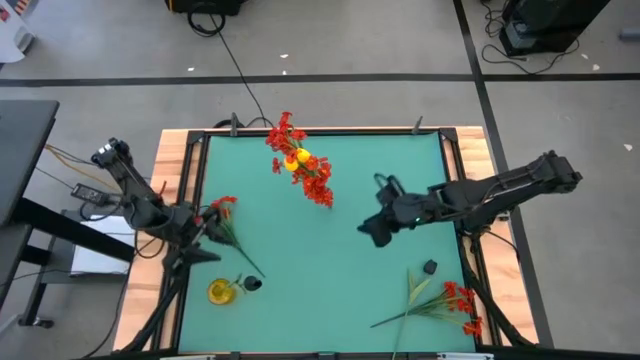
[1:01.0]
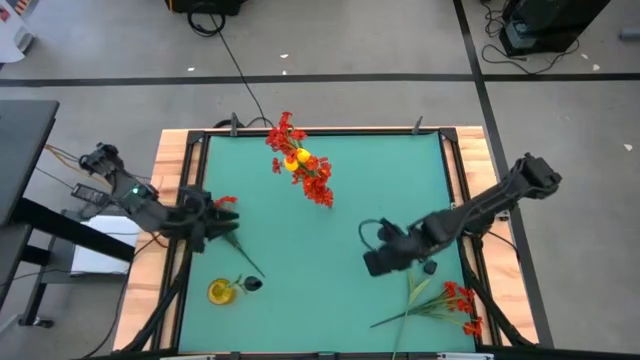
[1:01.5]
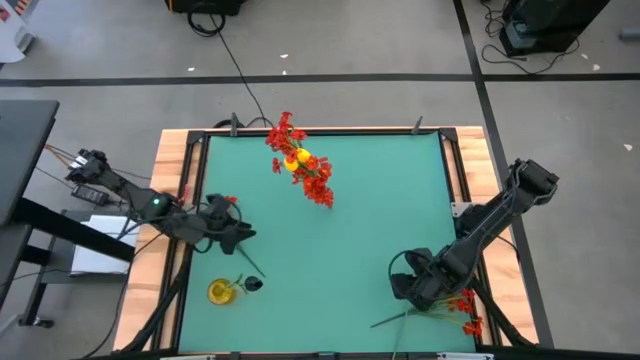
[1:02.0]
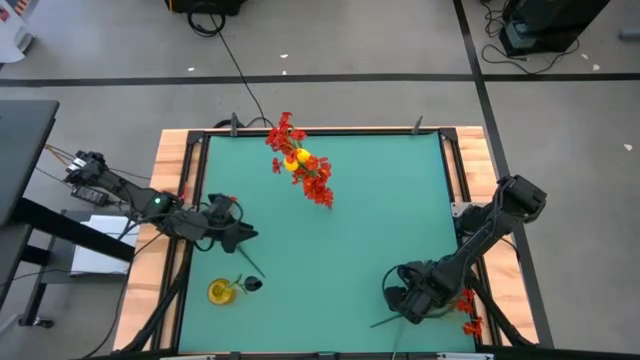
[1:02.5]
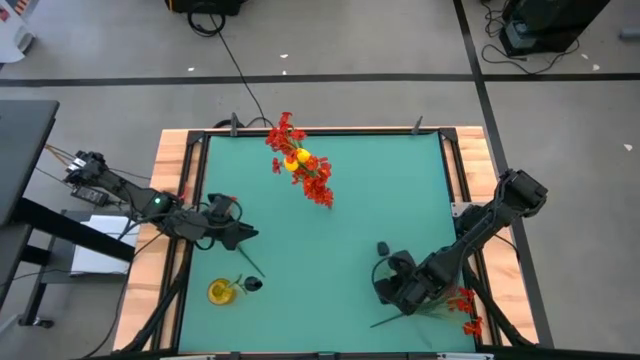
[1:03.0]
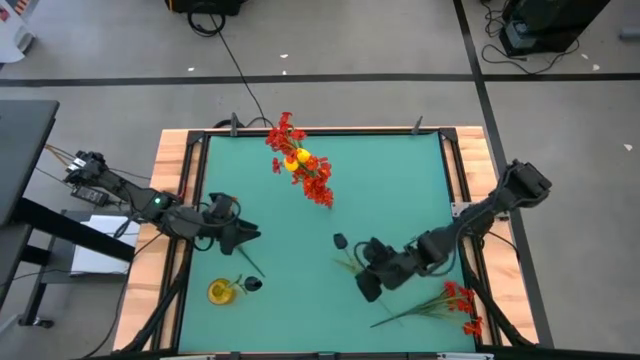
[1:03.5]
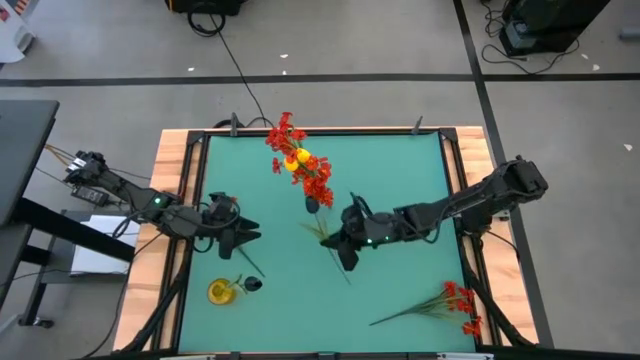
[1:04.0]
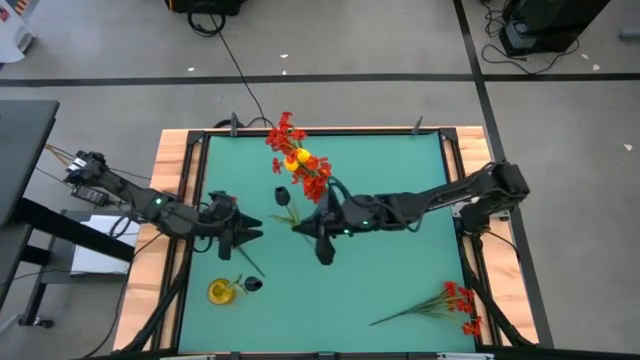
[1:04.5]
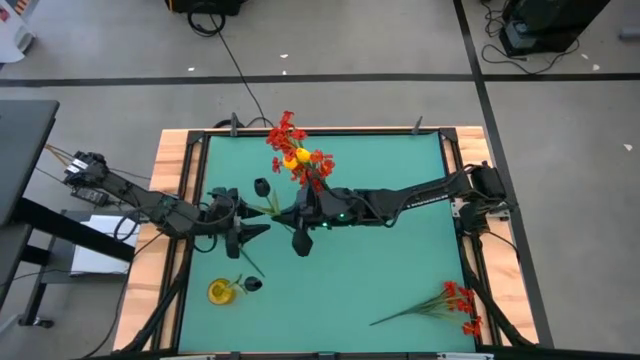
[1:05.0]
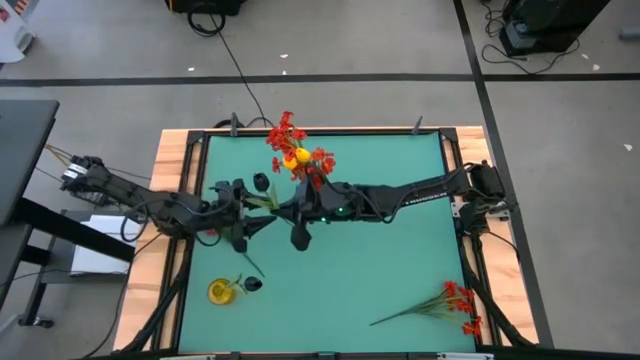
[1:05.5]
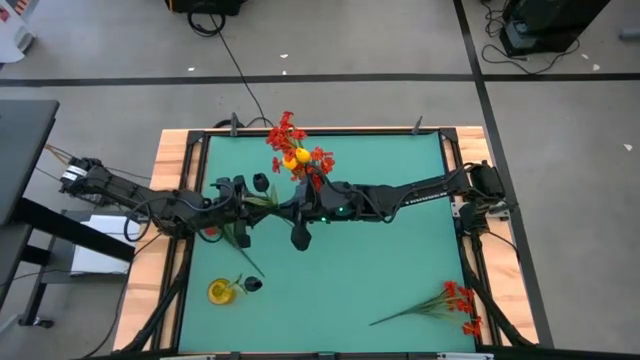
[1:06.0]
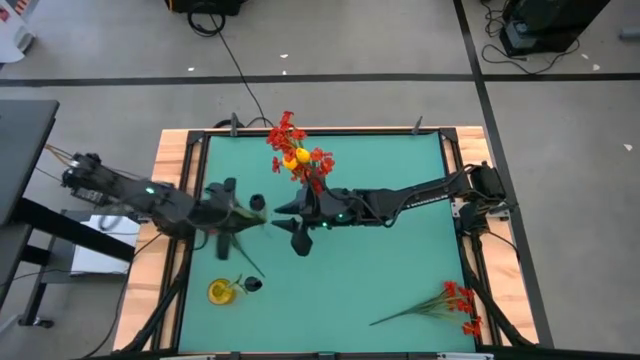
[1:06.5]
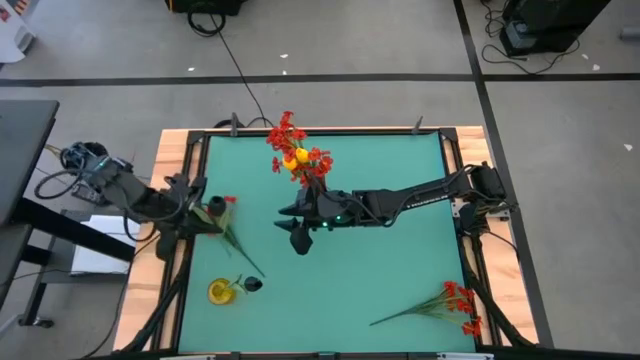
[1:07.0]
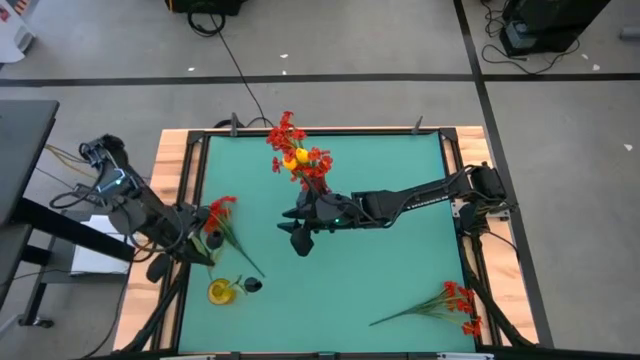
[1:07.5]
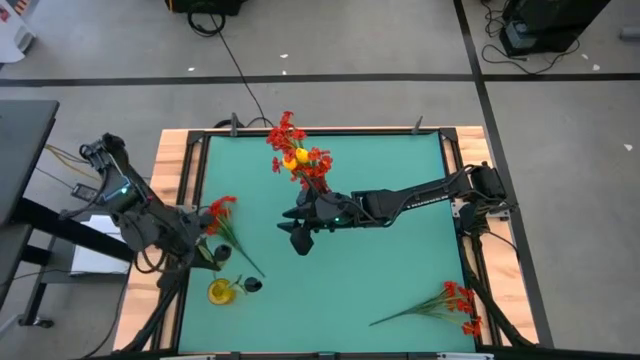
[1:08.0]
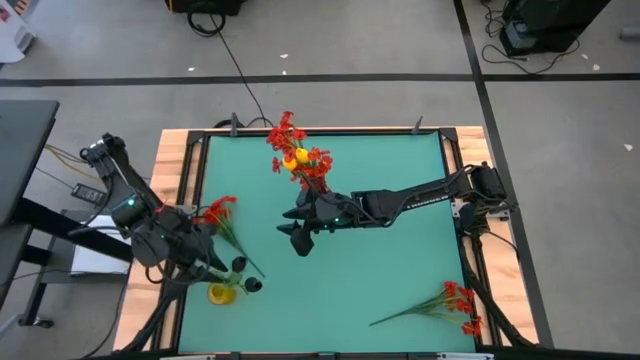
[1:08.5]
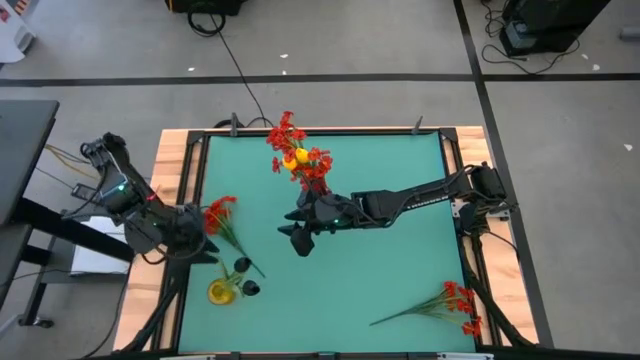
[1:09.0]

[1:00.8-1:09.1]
Task: Sort flowers into vase by color
Put the black tulip into the yellow vase

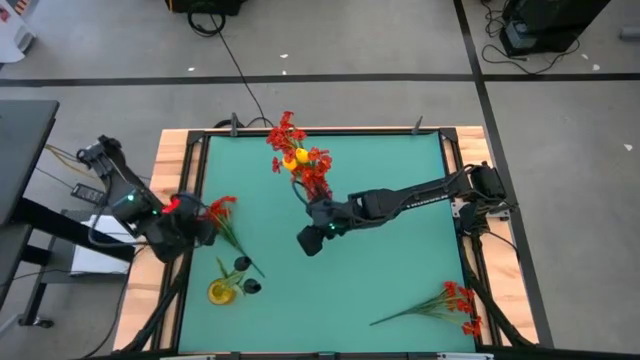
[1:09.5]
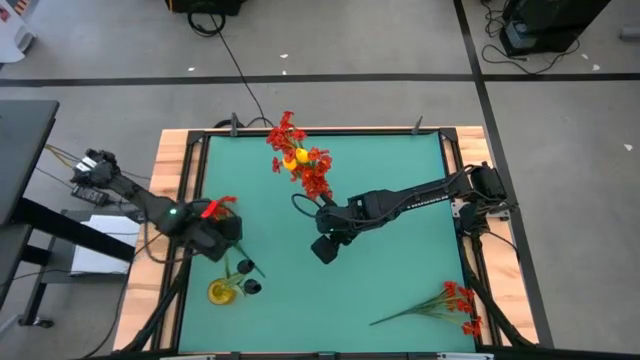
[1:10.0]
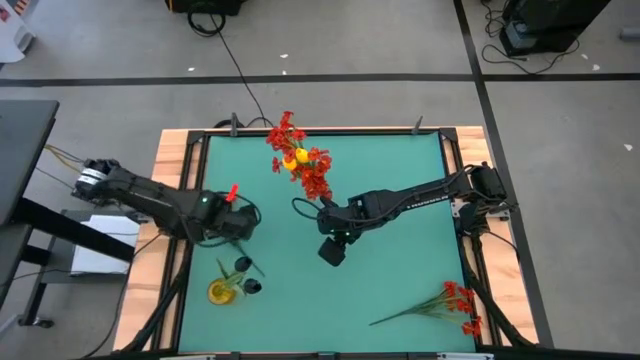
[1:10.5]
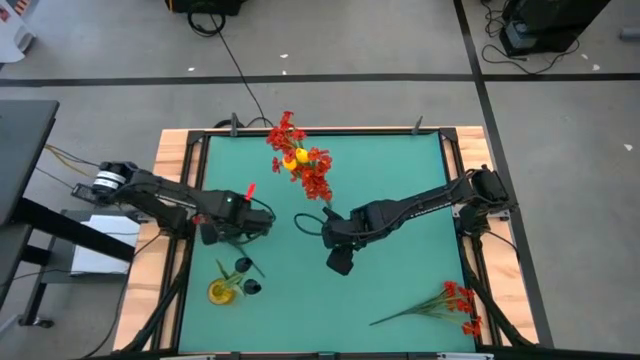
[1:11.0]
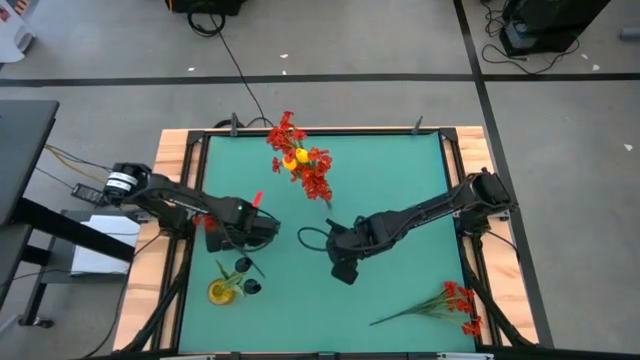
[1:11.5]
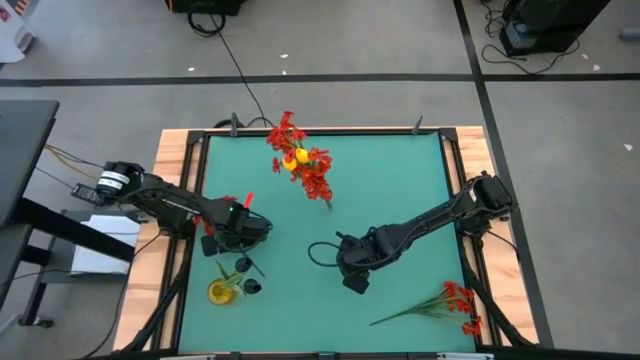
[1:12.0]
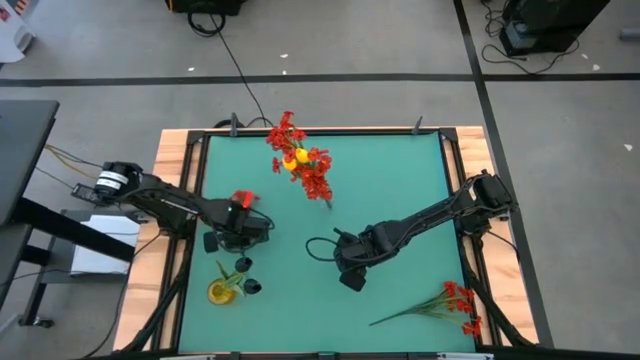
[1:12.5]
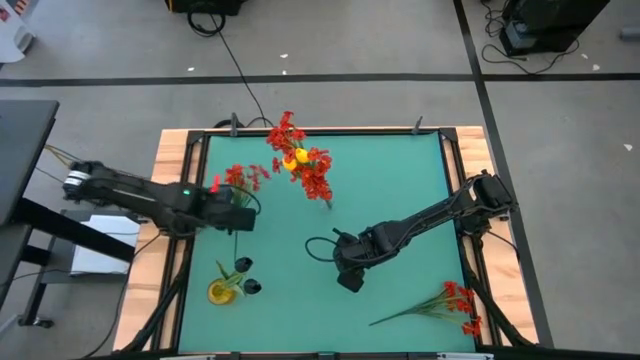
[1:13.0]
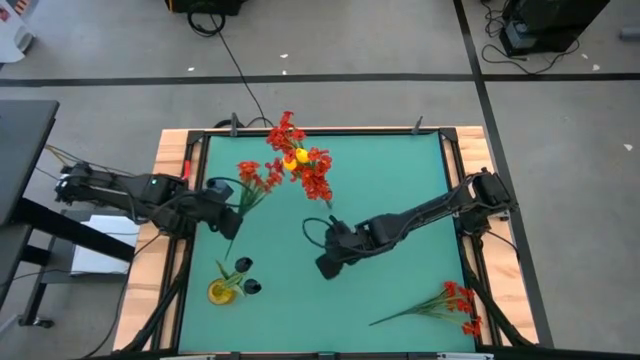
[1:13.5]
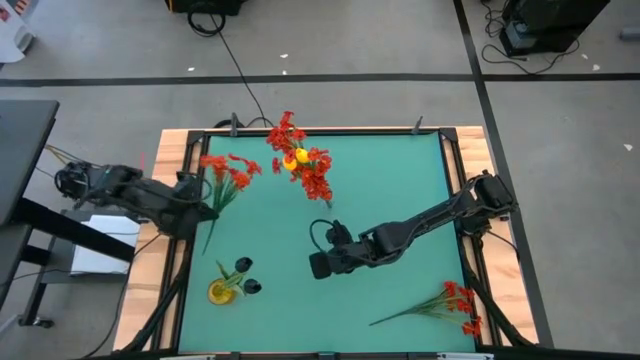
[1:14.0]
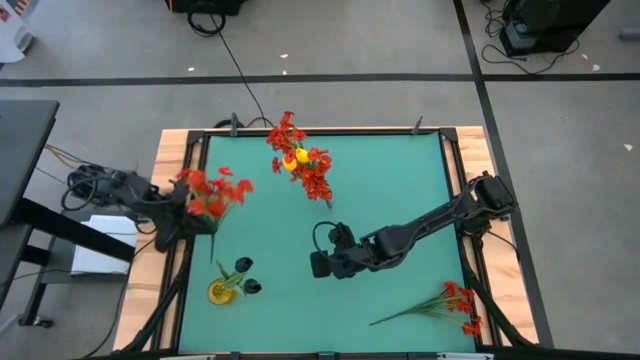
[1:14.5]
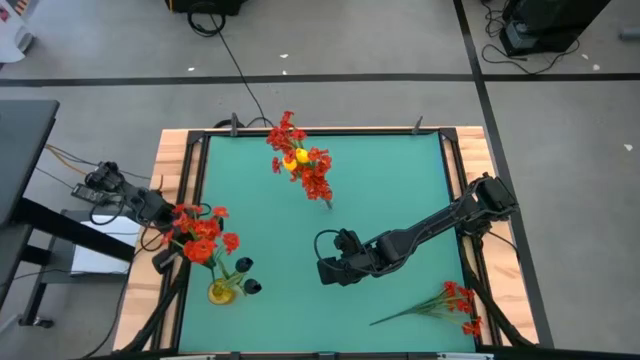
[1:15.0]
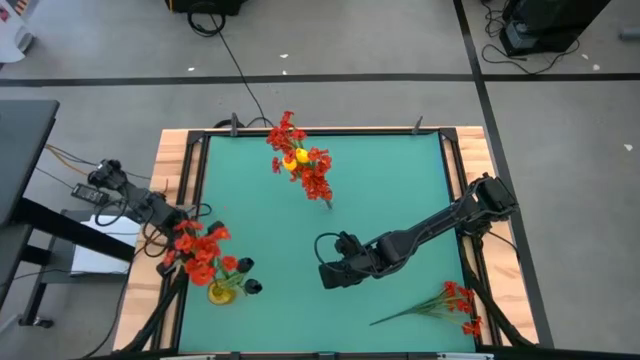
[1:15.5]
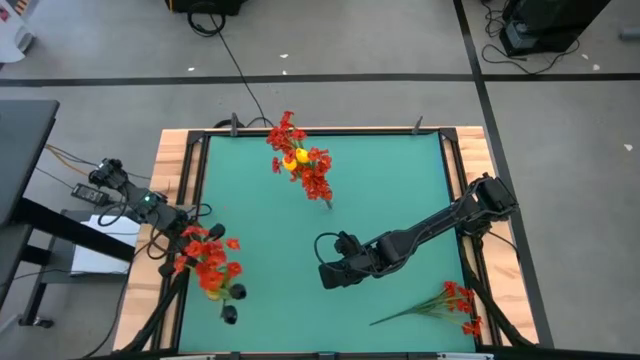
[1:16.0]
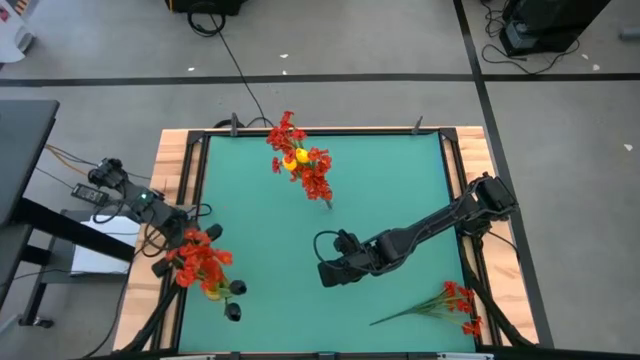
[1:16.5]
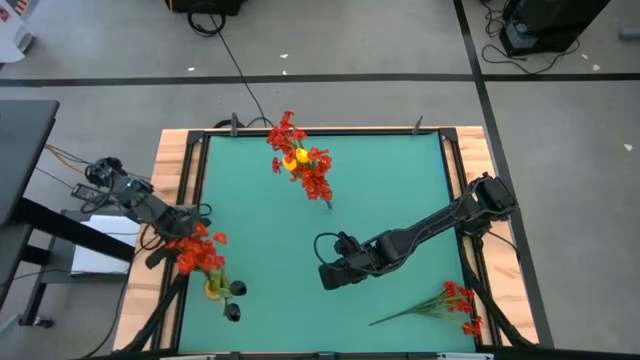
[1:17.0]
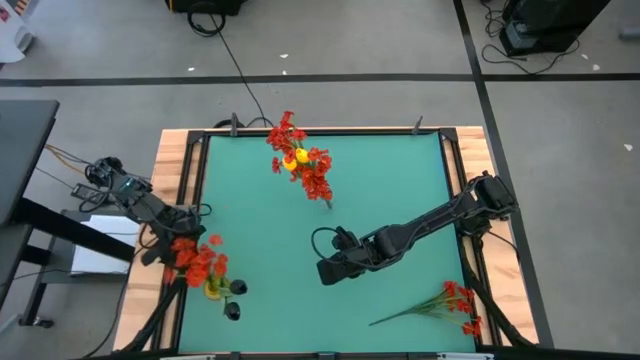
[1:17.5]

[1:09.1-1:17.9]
Put the red flowers into the yellow vase

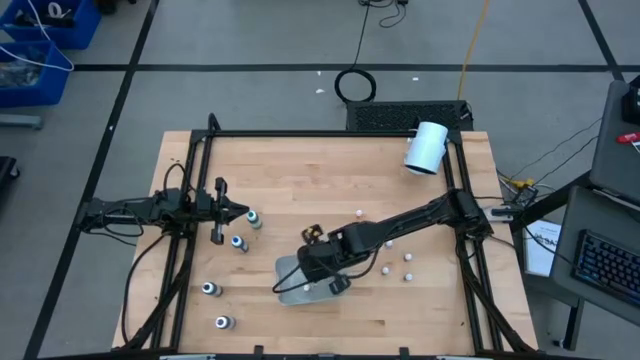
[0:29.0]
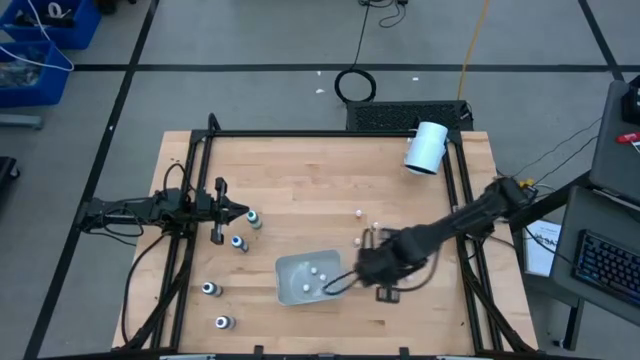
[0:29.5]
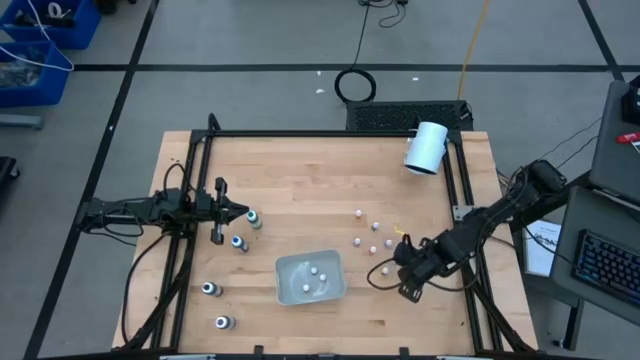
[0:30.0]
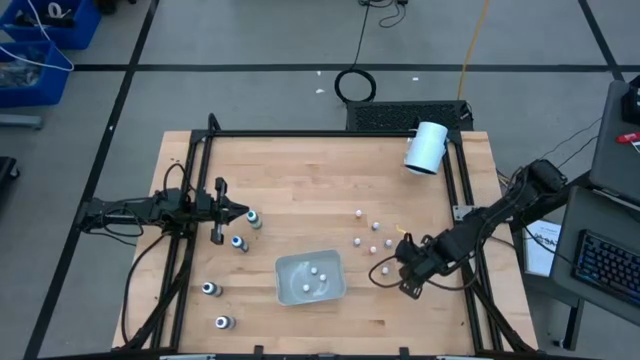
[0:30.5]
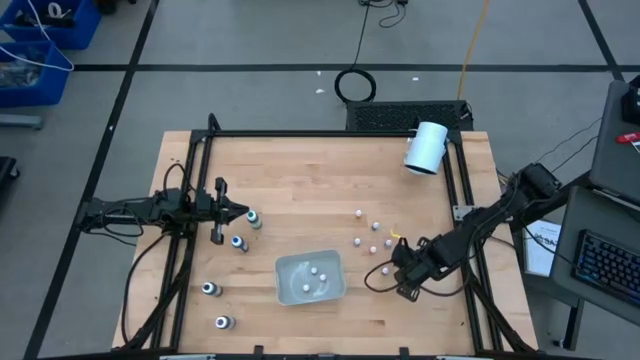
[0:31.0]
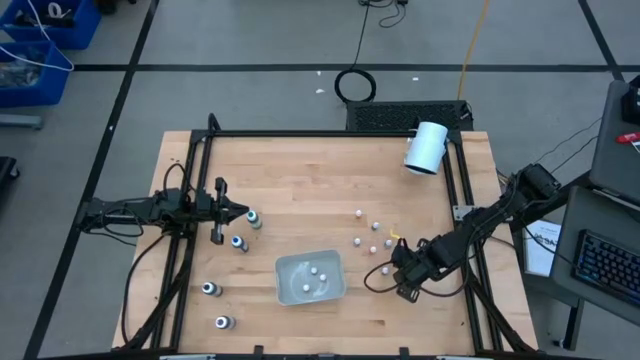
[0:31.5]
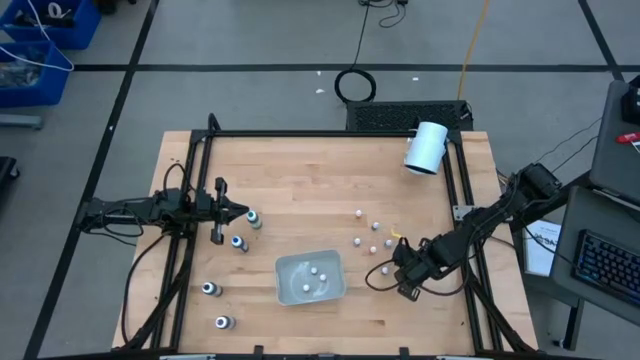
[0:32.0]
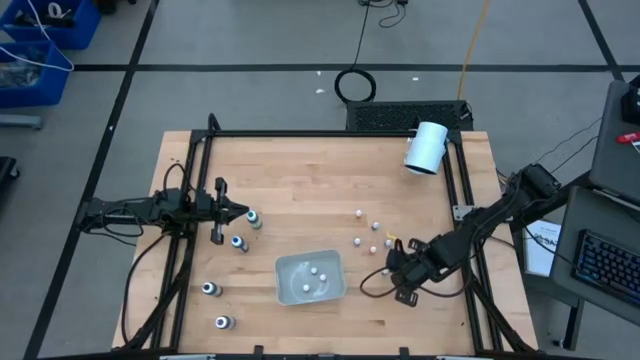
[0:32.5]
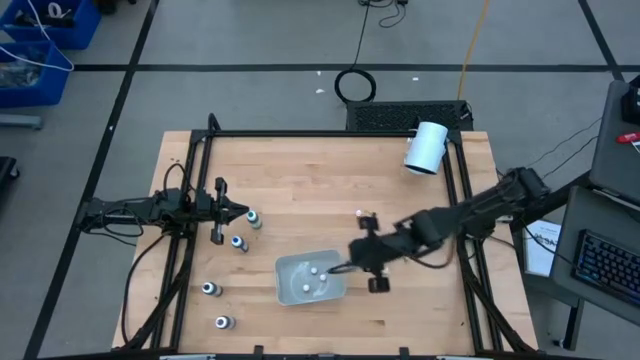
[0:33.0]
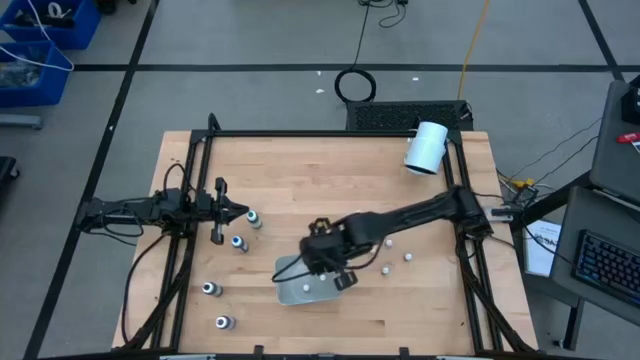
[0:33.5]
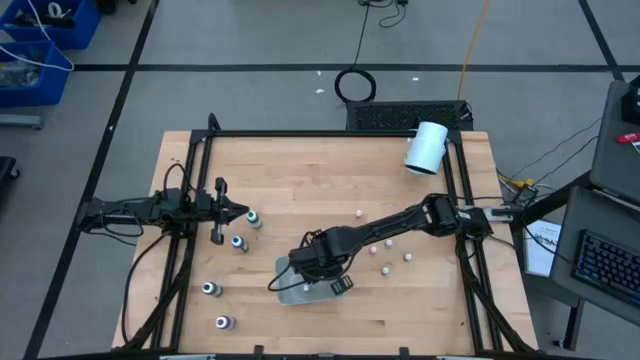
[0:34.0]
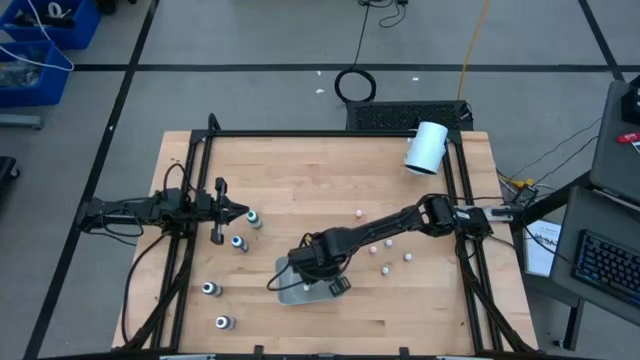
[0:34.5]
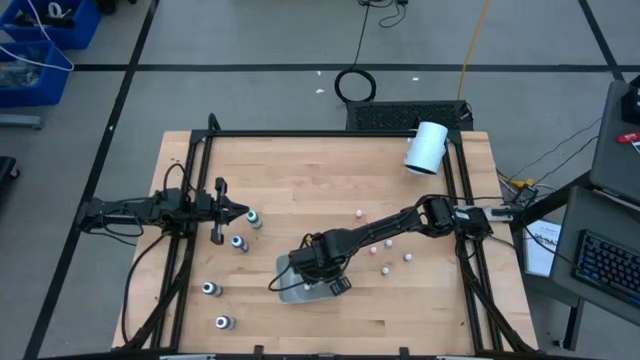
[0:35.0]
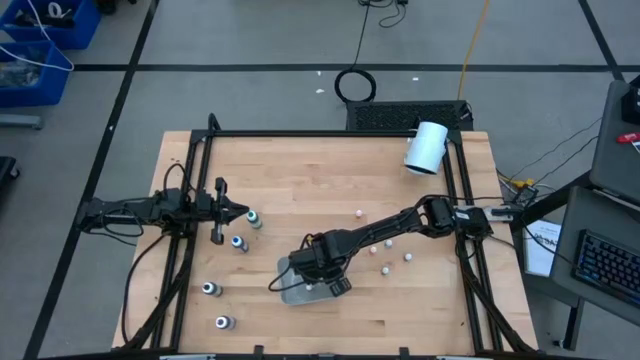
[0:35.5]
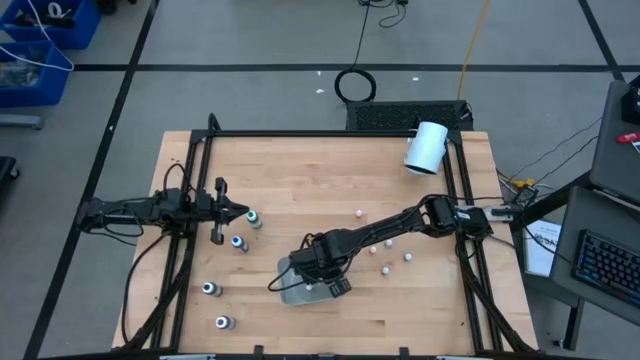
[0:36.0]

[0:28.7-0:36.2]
Task: Pick & Place food coloring
Put the small blue food coloring bottle in the gray bin
